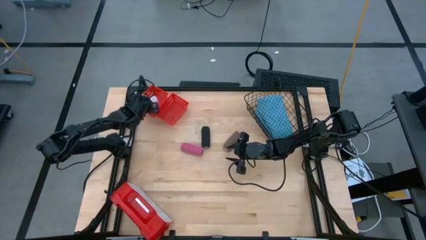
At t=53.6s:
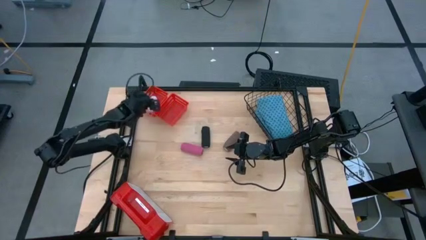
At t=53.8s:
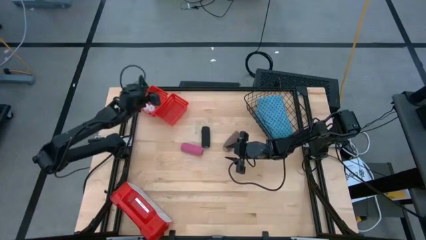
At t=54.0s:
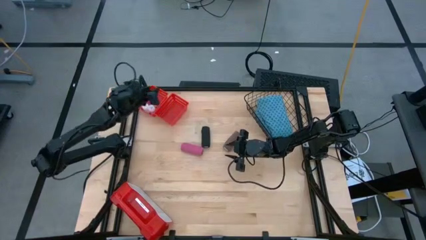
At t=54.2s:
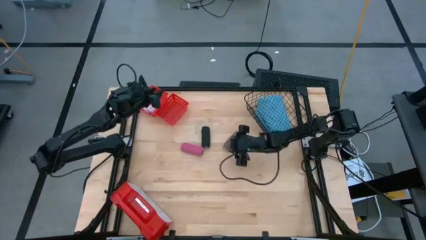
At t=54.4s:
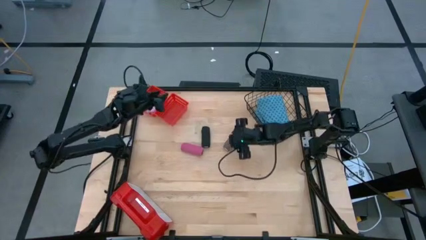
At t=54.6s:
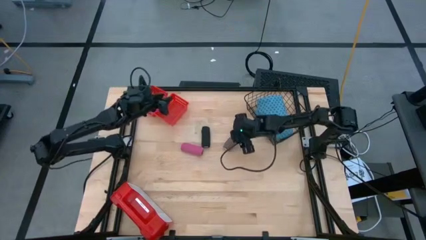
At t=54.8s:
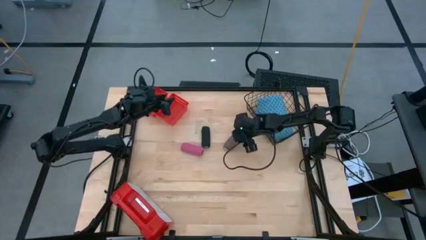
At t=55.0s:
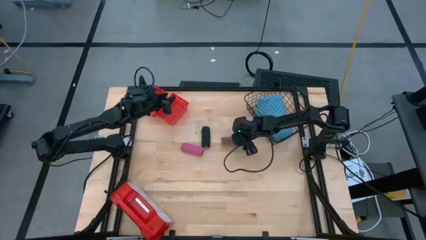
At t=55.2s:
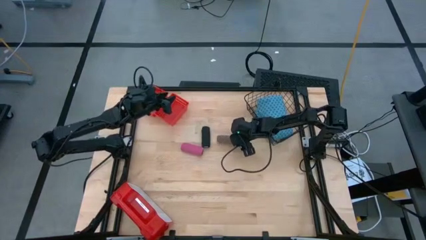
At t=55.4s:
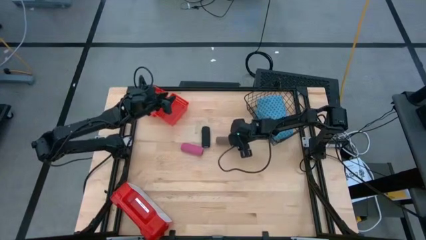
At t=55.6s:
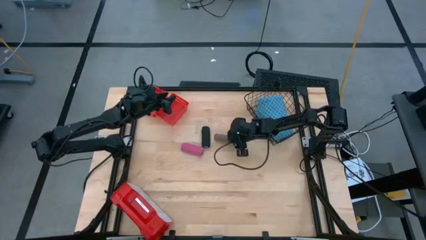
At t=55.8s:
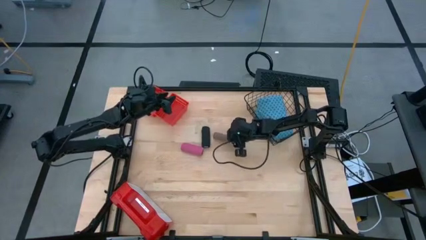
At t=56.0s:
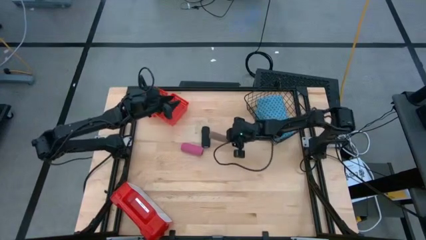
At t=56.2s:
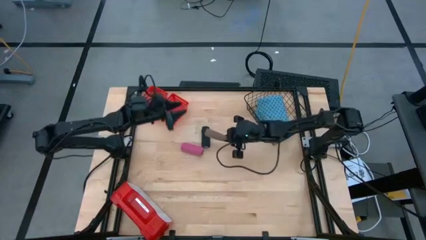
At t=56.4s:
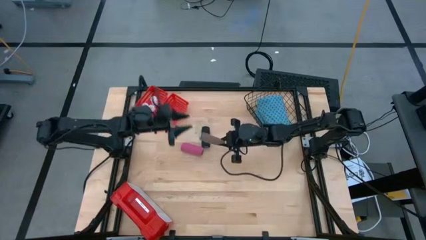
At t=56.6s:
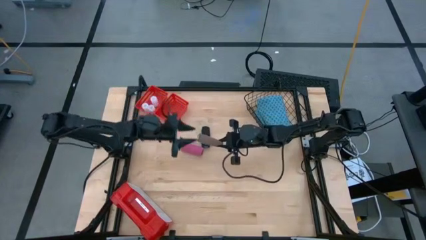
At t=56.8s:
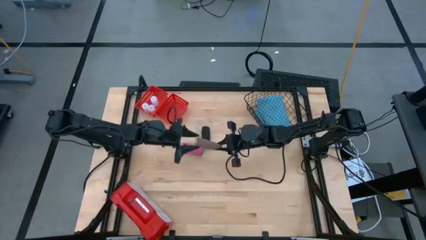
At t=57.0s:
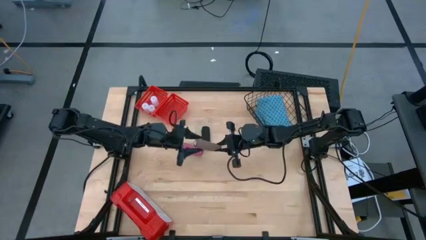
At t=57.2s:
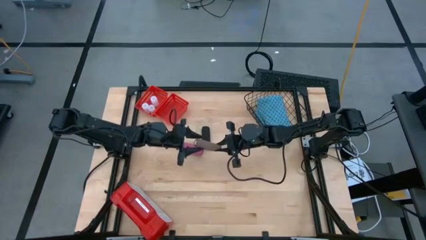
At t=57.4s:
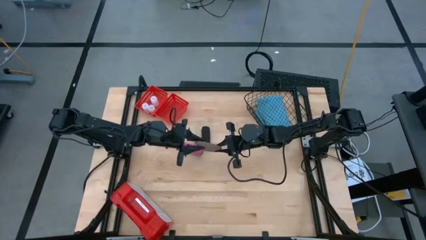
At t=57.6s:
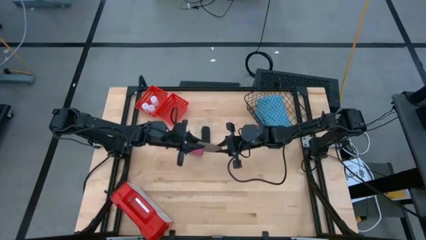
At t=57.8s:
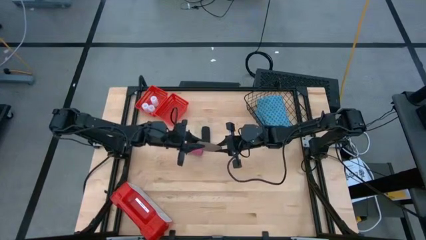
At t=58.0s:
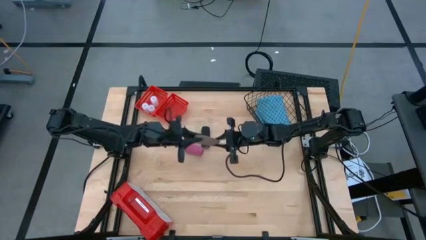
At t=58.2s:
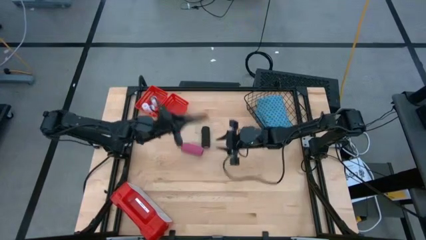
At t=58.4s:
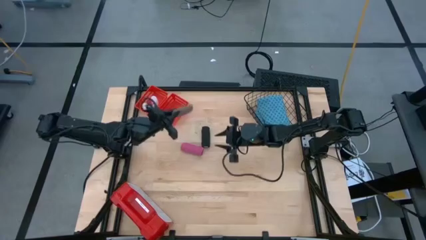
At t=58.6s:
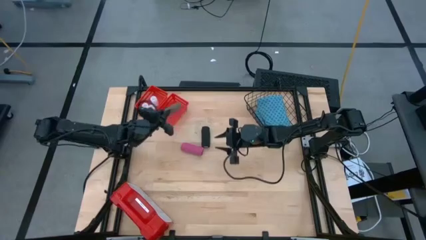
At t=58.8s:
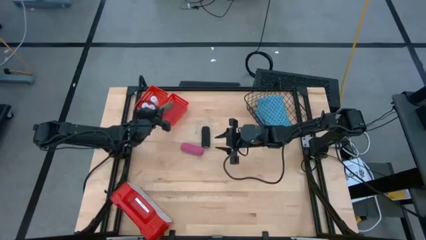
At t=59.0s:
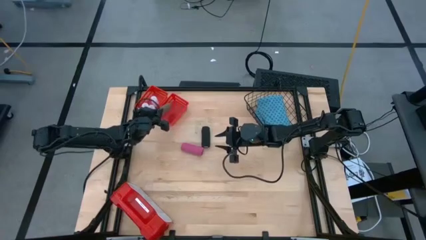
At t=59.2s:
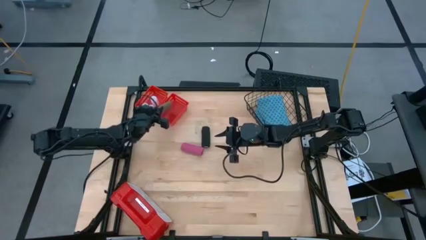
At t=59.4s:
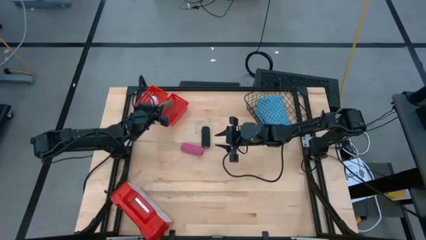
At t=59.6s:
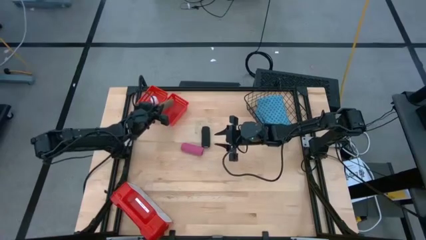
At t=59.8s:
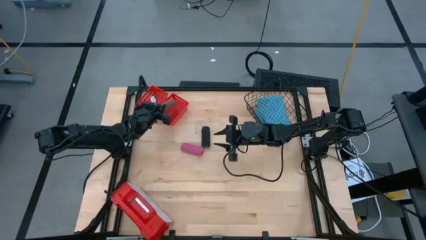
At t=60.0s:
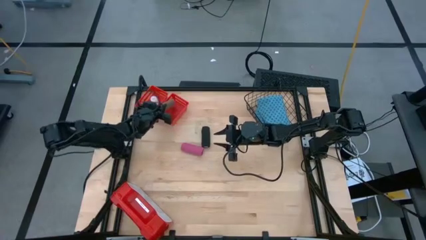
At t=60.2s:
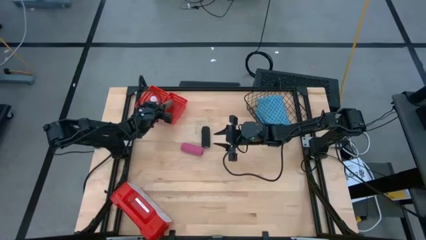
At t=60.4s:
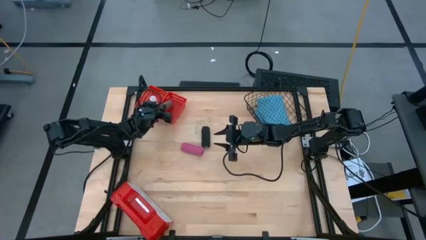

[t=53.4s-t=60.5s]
Task: Pick & place medical supplies in basket/bin
Put the brown bandage into the right red bin

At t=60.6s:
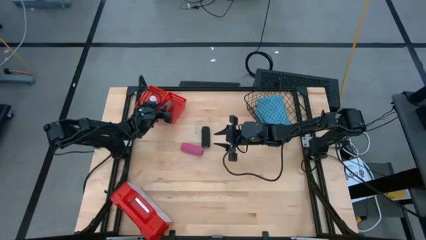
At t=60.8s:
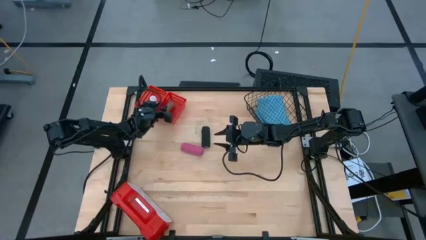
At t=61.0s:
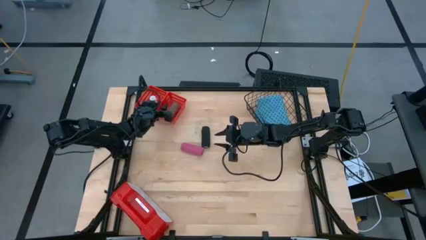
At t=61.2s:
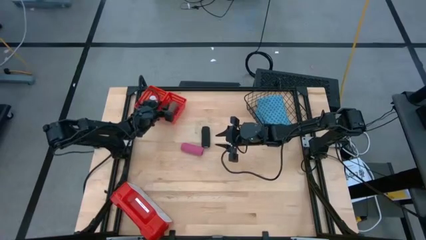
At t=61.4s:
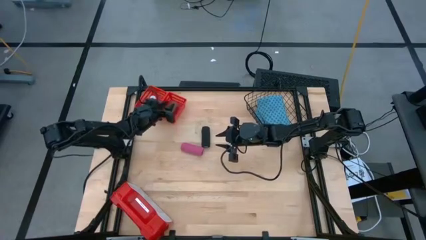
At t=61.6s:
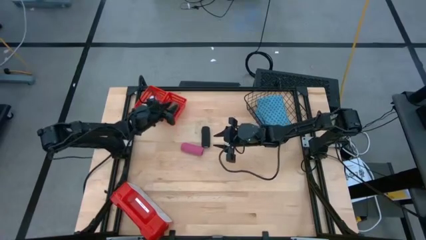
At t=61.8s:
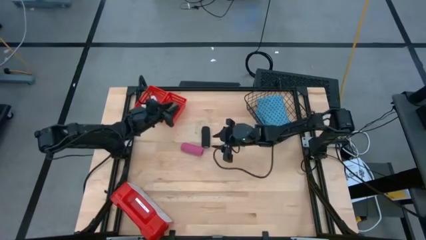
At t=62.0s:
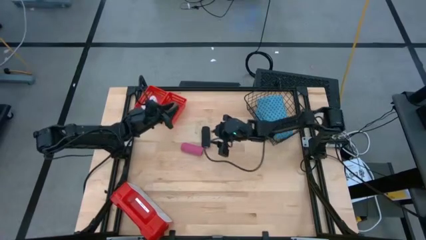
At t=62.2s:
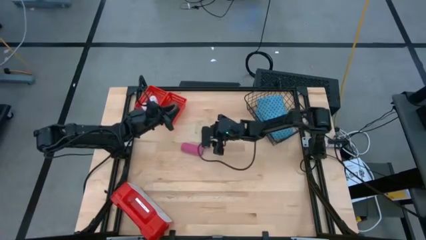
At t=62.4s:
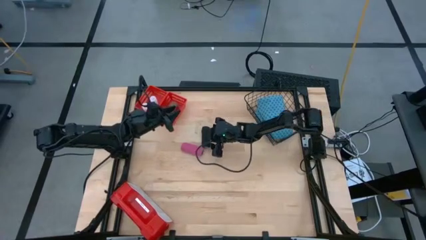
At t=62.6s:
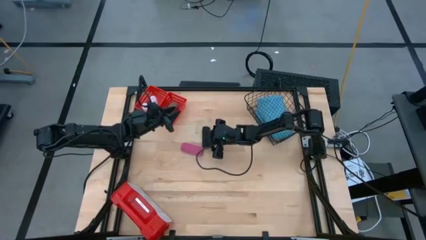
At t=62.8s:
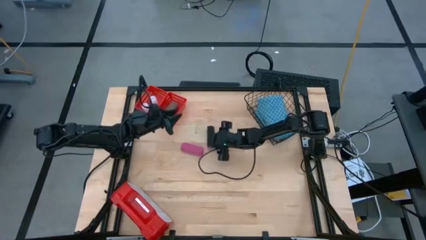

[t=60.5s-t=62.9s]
Put the black bandage into the right red bin

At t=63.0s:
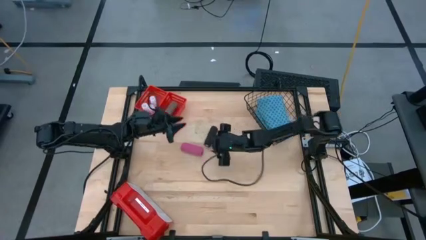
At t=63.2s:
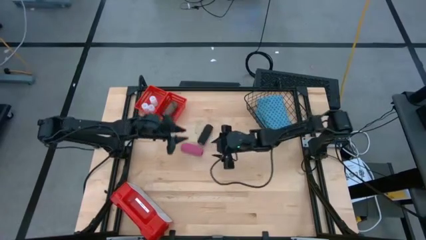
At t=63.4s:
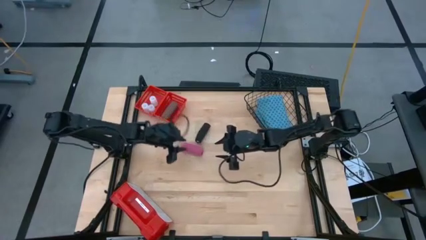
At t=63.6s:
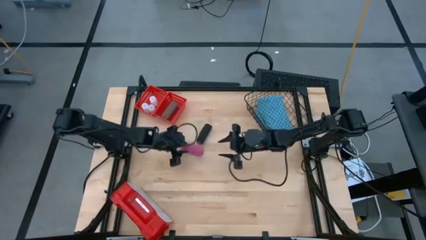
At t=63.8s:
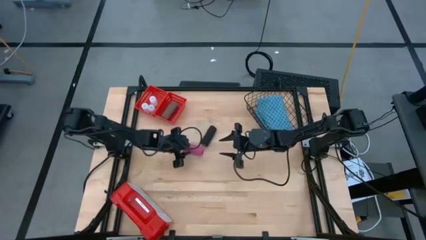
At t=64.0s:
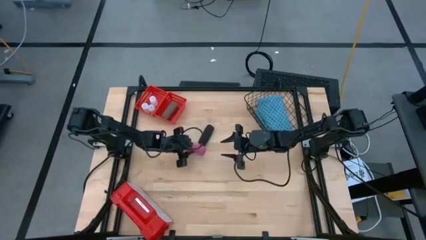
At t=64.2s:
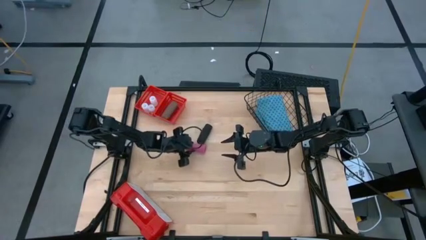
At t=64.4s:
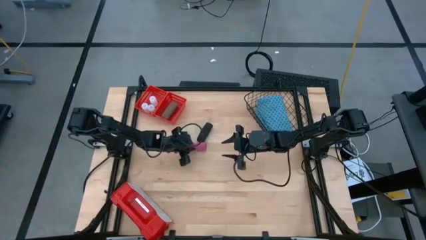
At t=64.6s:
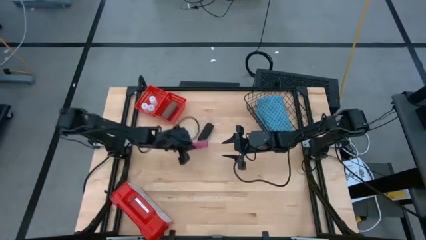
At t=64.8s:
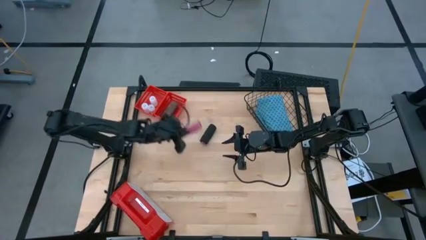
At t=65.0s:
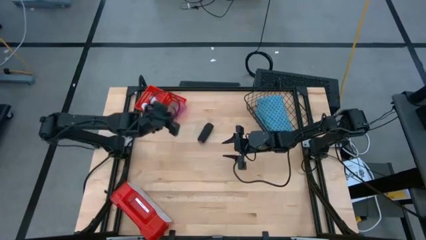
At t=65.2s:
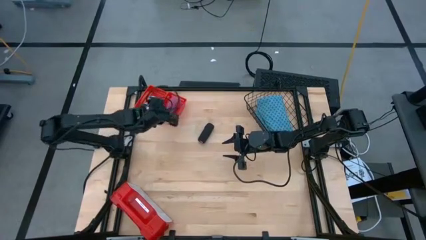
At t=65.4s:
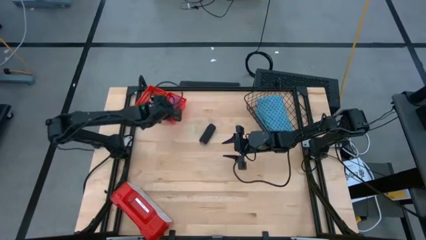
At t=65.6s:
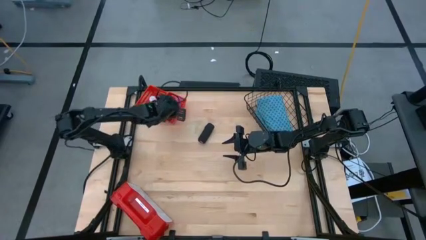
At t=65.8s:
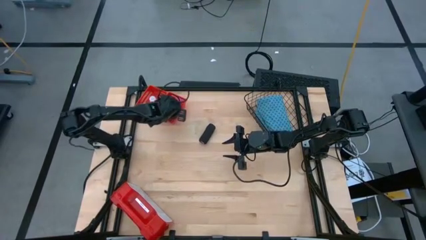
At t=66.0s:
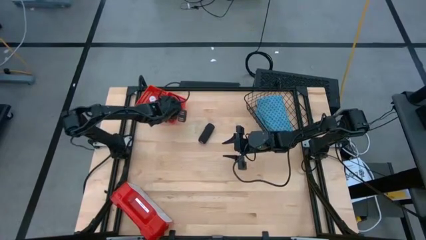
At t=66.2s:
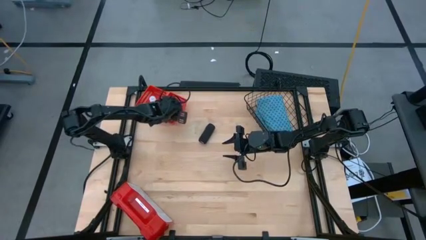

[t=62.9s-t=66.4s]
Put the pink bandage into the right red bin

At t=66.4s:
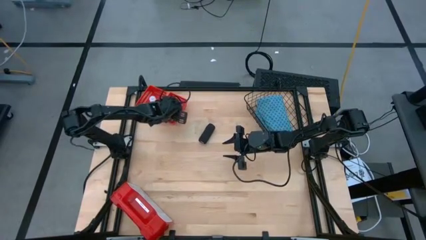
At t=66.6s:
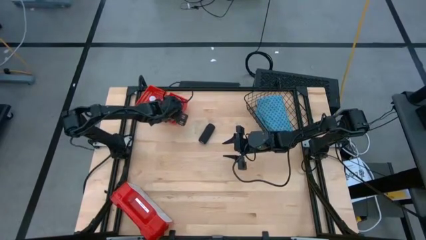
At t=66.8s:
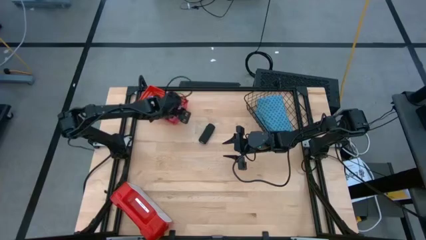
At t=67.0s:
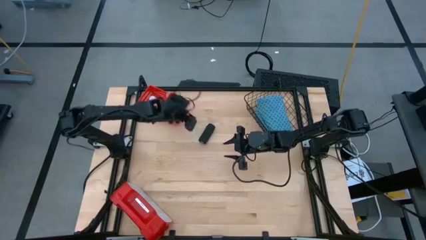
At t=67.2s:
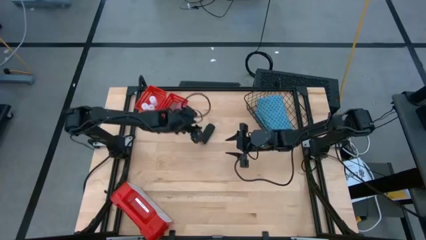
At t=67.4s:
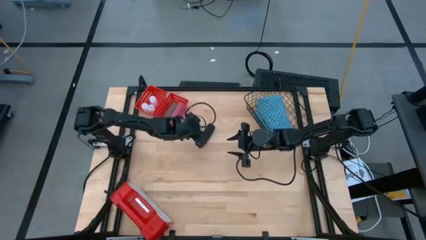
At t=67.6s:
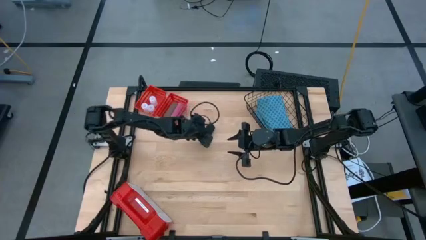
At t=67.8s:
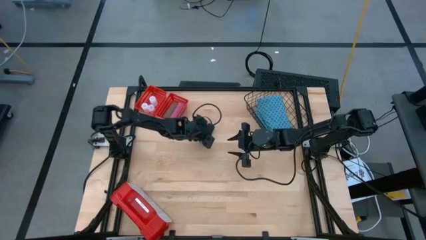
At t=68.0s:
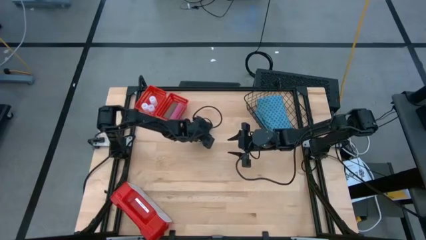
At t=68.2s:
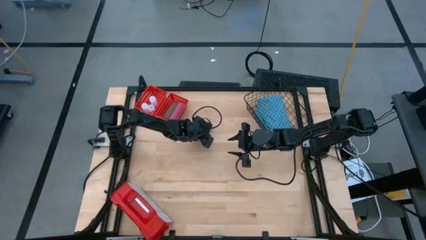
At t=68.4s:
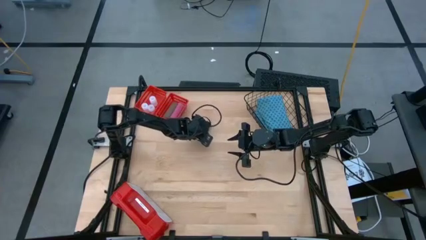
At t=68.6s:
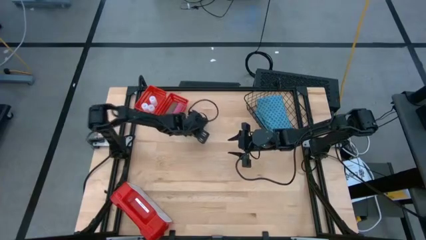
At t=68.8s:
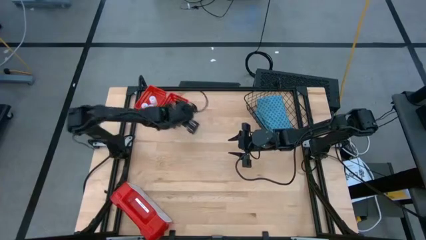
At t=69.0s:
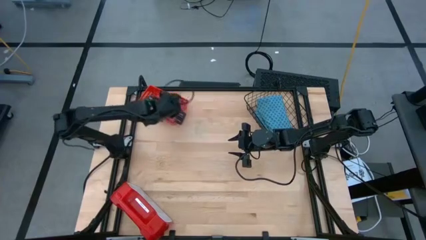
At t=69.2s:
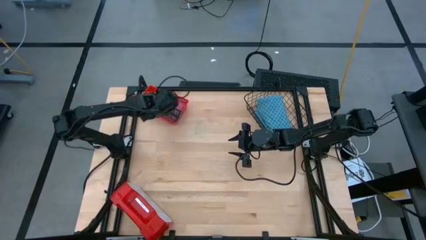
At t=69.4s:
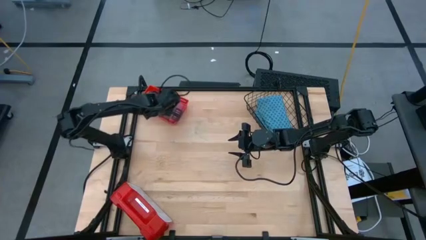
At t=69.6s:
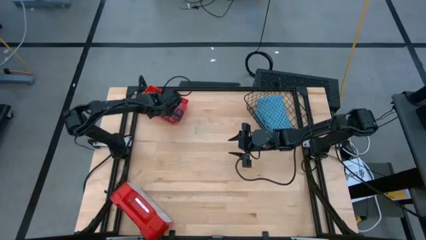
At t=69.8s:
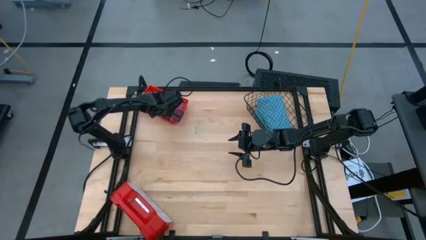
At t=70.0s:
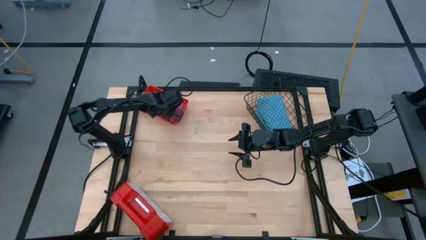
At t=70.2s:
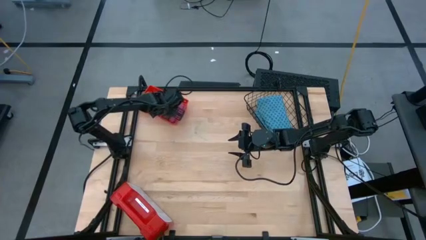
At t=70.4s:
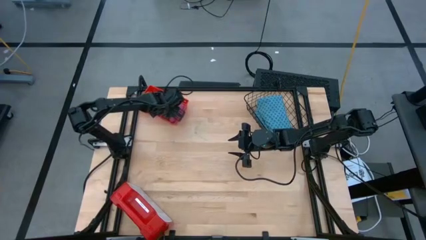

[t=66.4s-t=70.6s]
Put the black bandage into the right red bin
